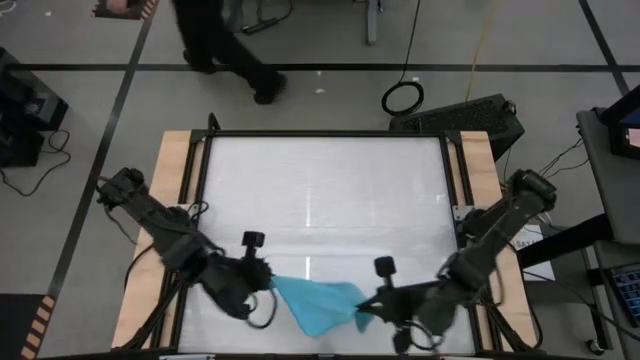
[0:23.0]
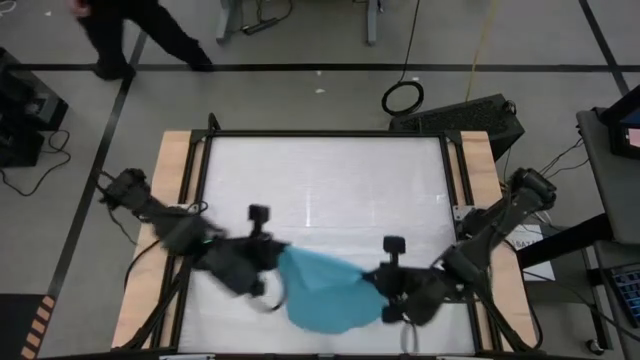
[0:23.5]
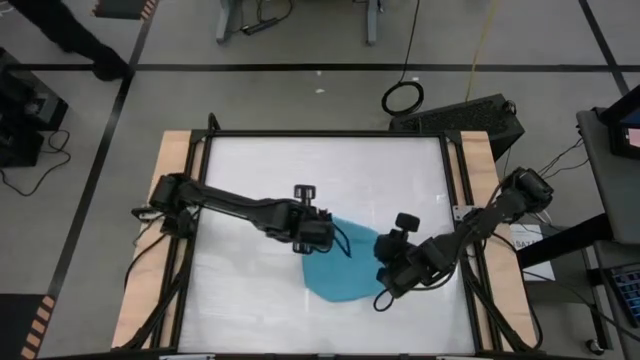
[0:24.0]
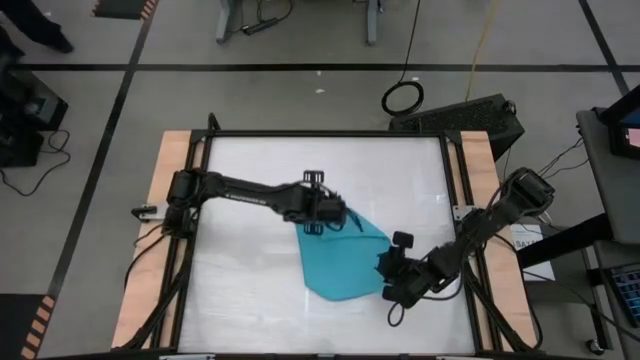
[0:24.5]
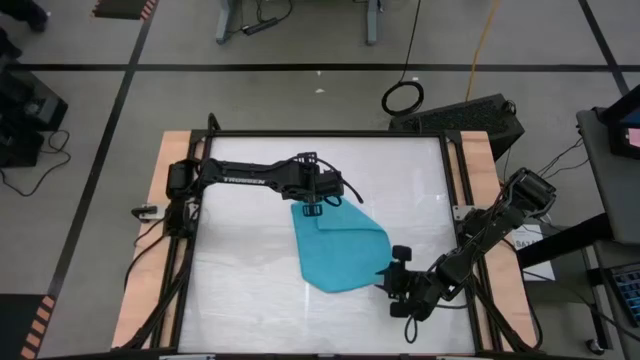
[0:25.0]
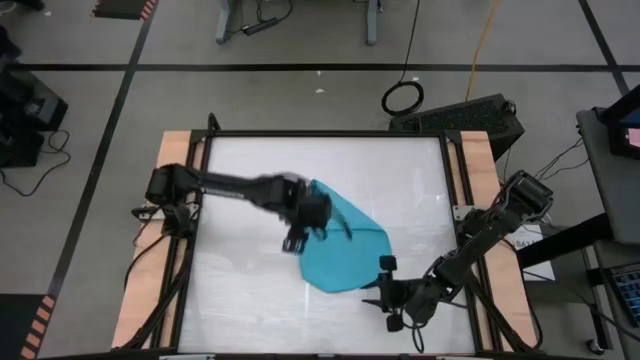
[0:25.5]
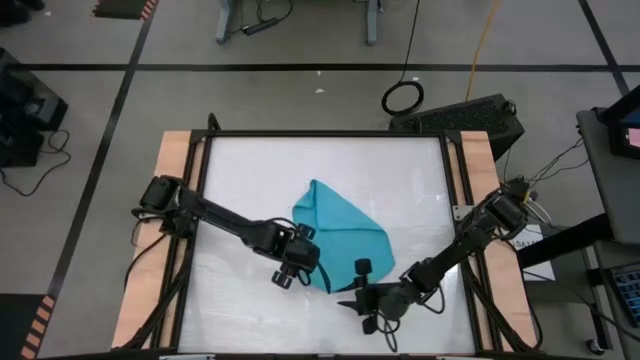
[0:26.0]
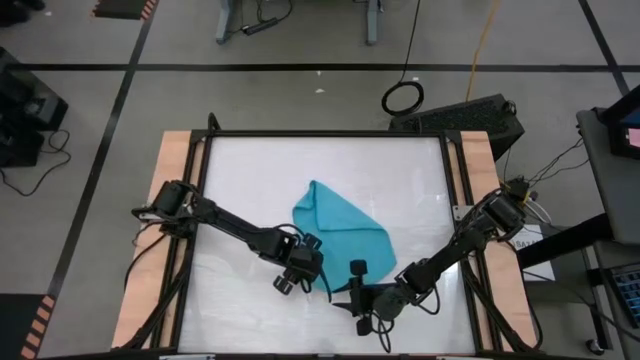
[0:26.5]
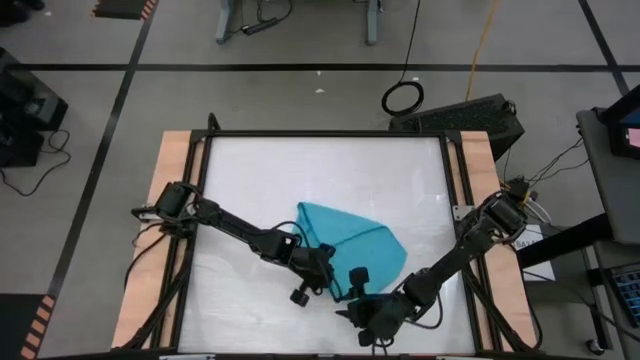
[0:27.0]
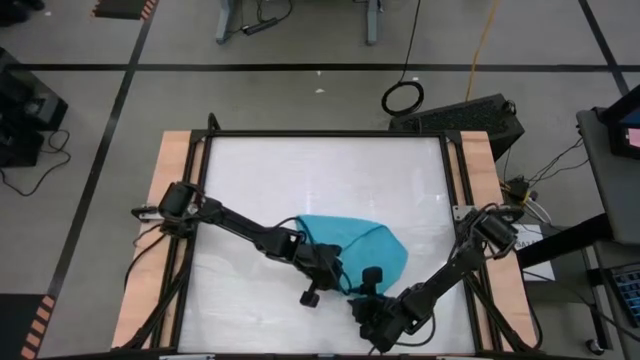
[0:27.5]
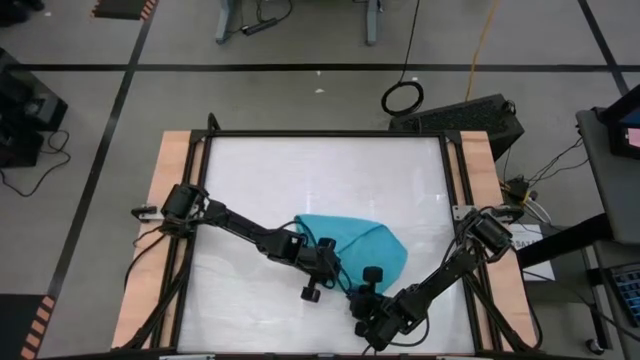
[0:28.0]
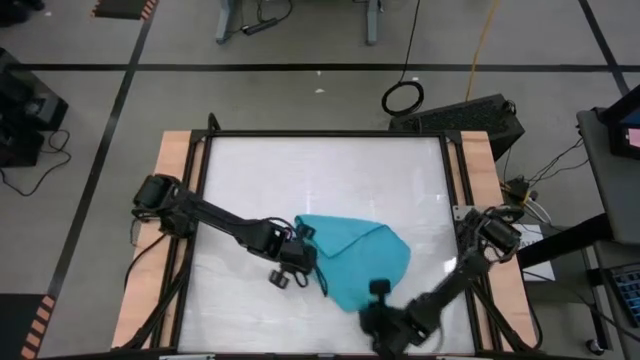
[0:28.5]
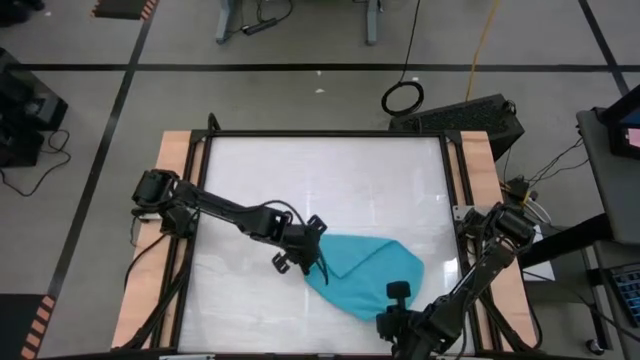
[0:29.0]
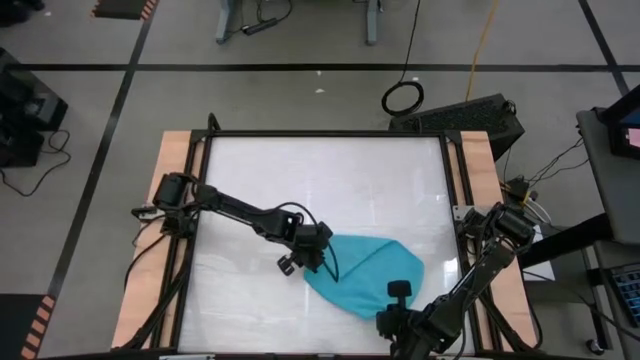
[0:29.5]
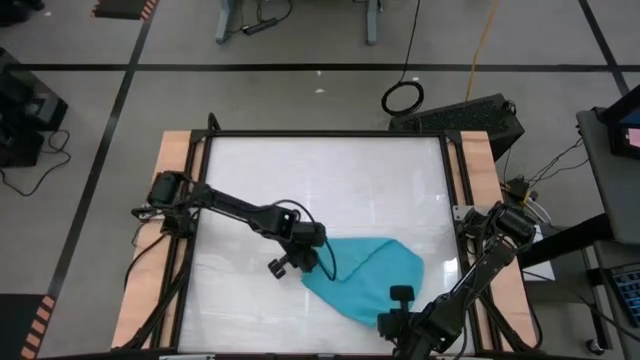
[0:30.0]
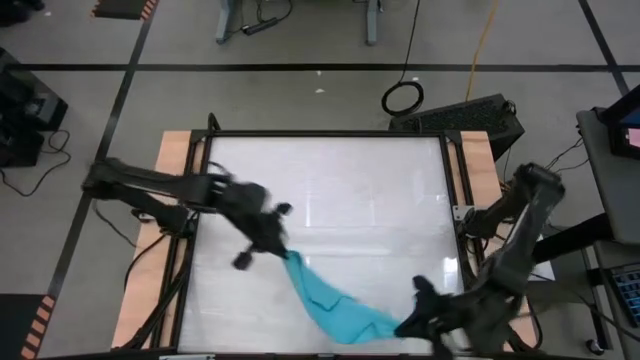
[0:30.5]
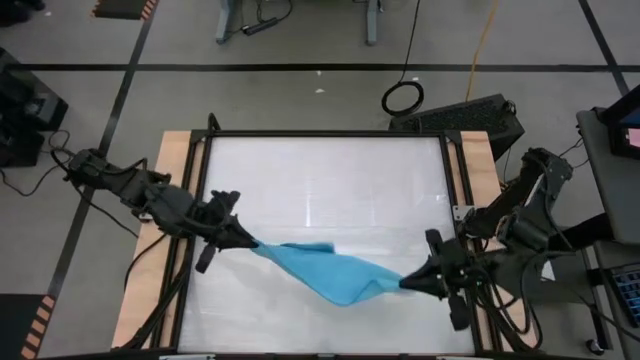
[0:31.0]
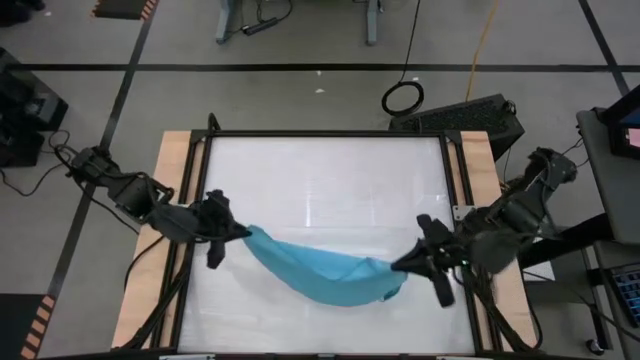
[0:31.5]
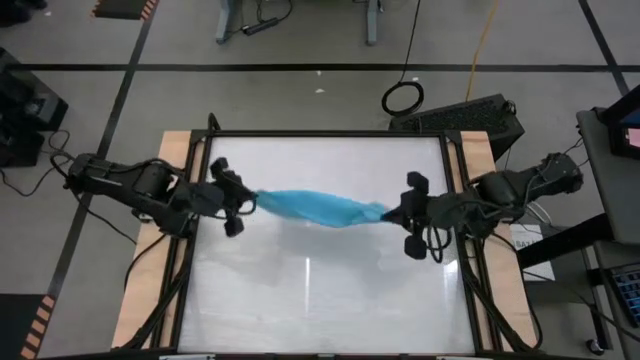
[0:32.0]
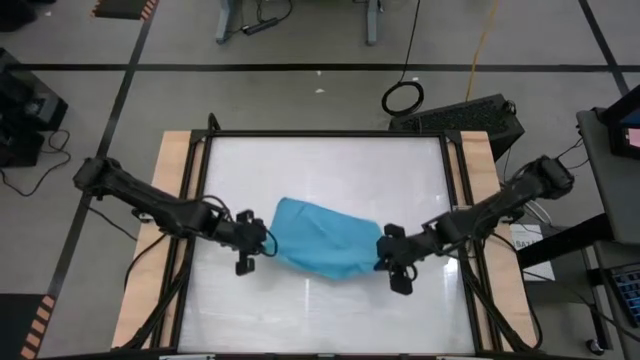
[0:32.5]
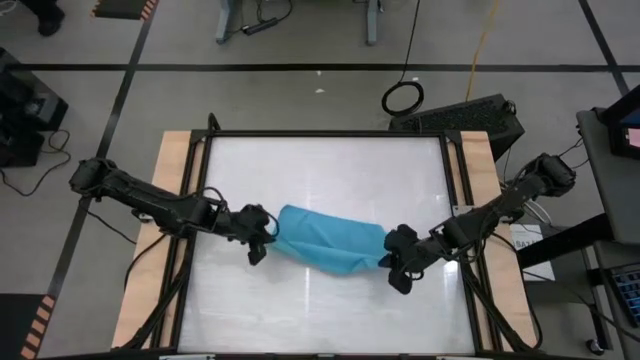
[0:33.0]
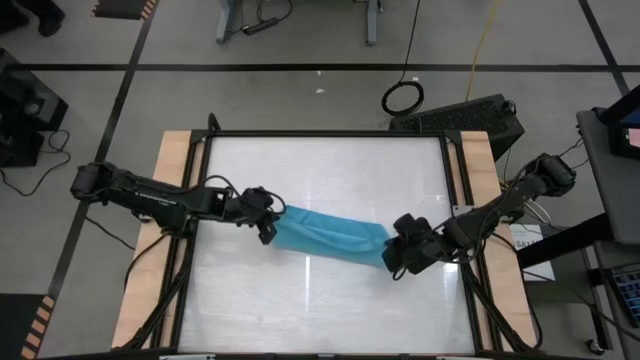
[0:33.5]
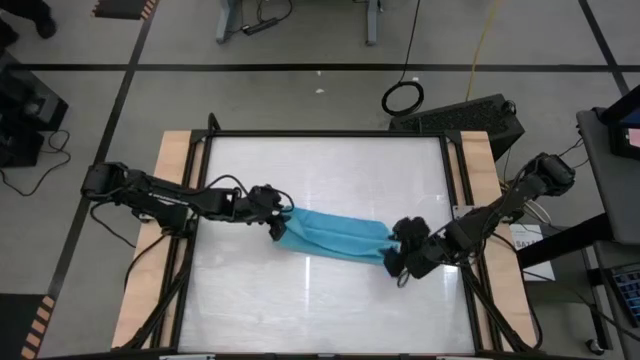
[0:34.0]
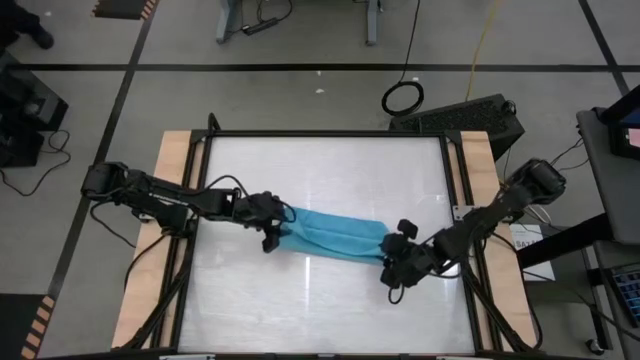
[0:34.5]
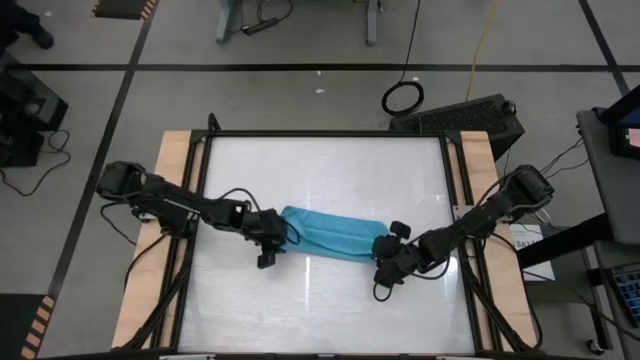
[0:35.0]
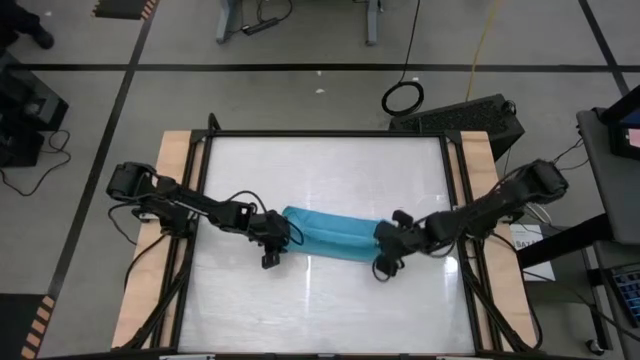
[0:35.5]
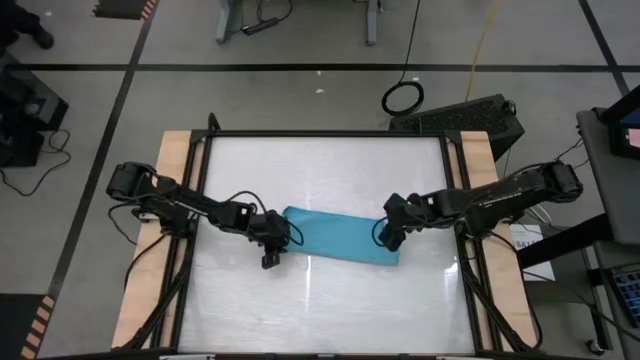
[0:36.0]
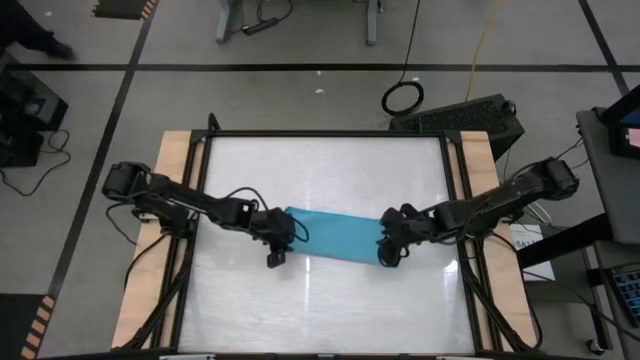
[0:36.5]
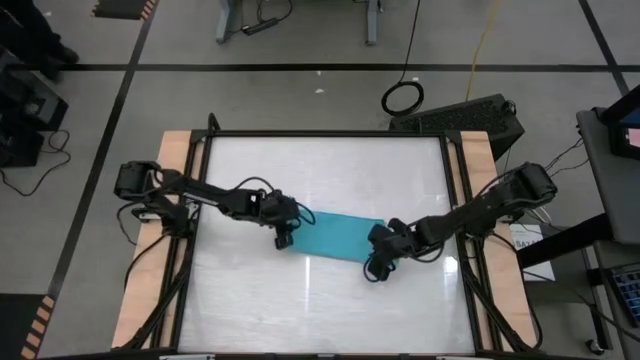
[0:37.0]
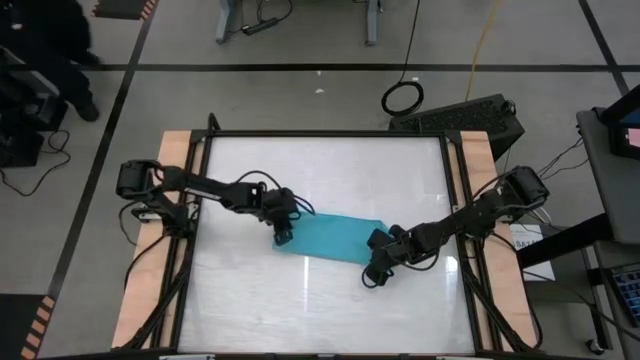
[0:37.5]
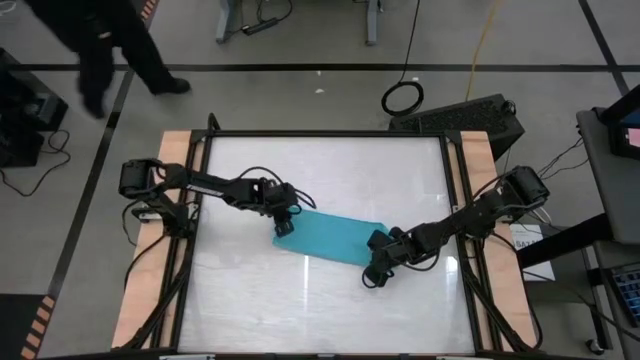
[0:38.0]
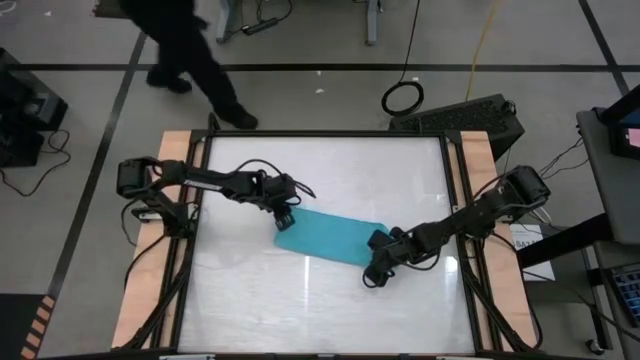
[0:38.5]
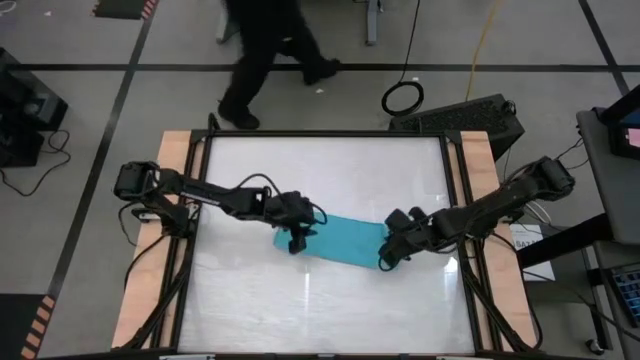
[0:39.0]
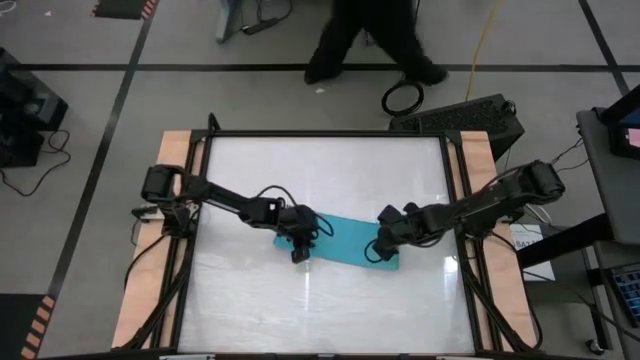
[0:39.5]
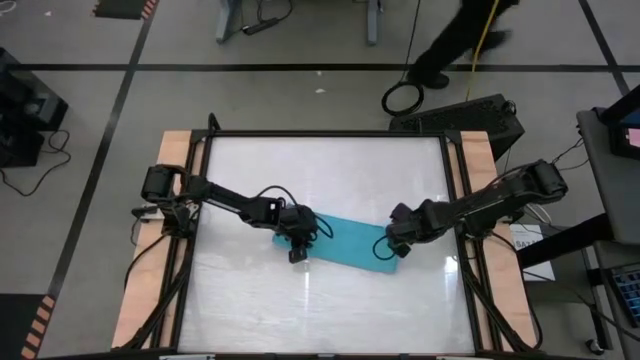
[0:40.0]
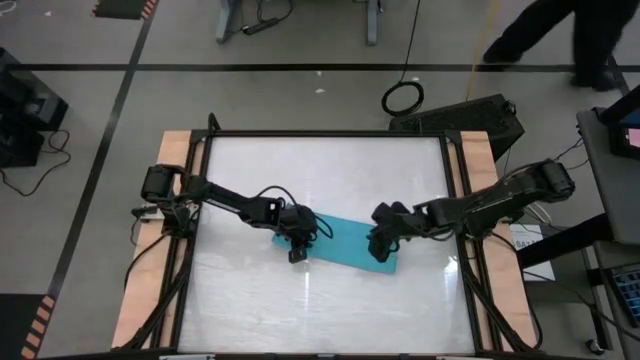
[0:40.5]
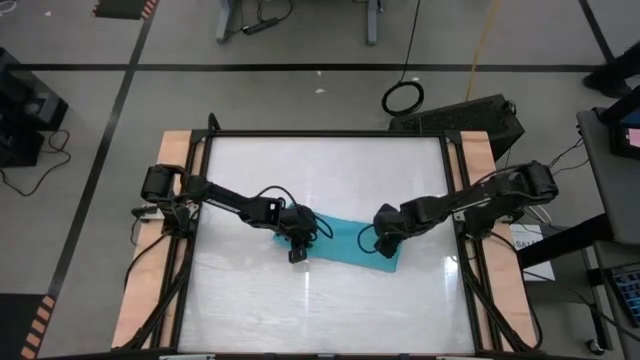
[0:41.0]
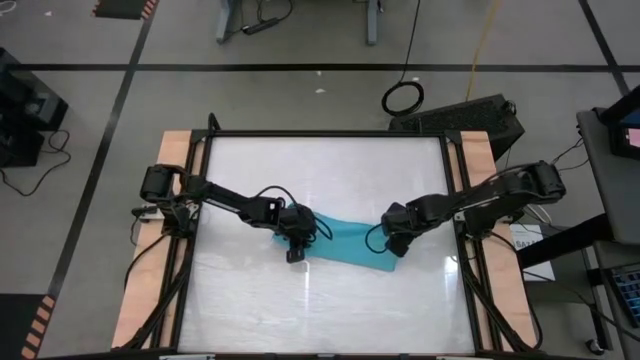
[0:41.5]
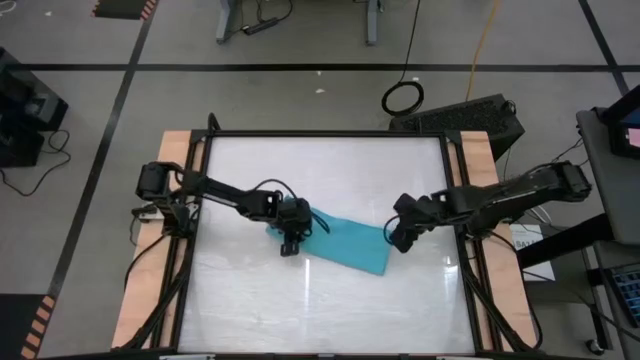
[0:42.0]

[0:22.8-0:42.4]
Task: Roll towel
Roll the blue microfiber towel
